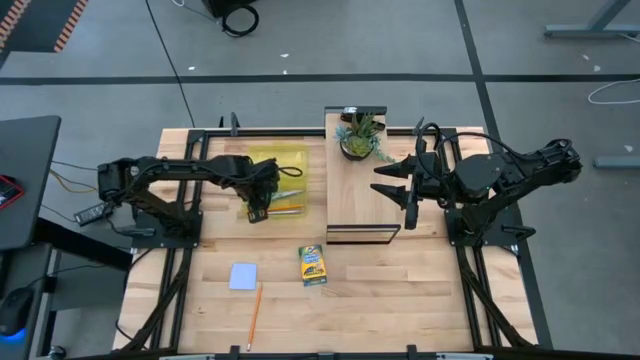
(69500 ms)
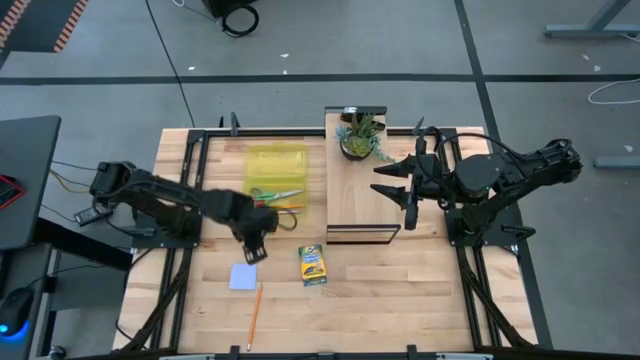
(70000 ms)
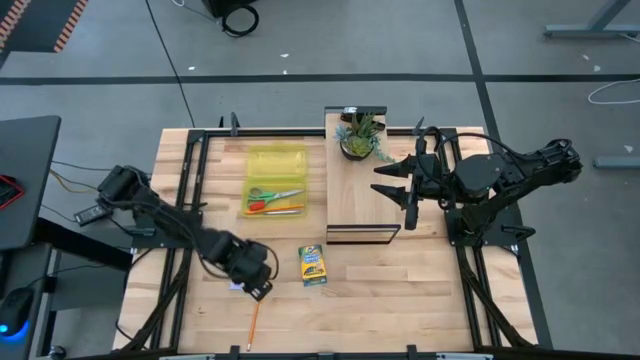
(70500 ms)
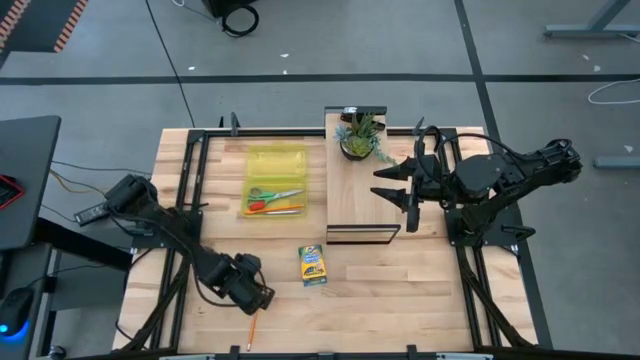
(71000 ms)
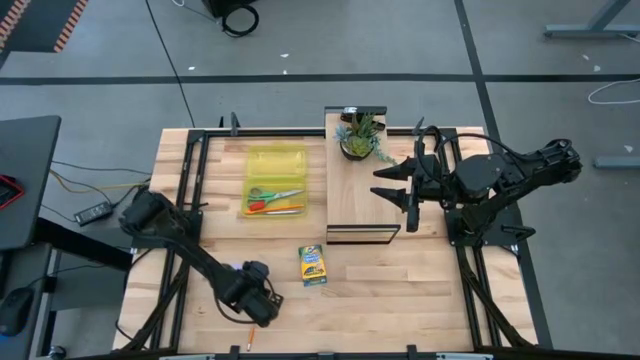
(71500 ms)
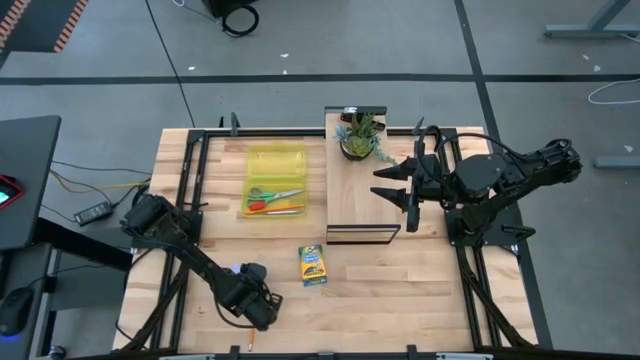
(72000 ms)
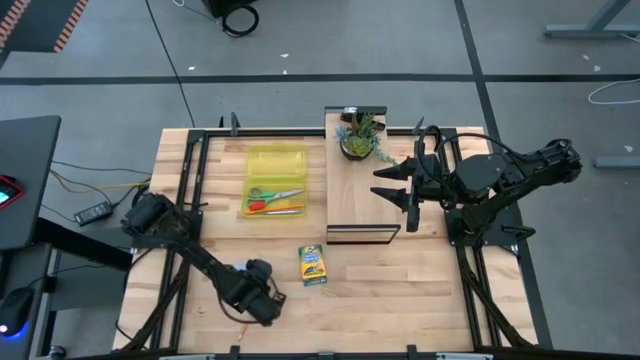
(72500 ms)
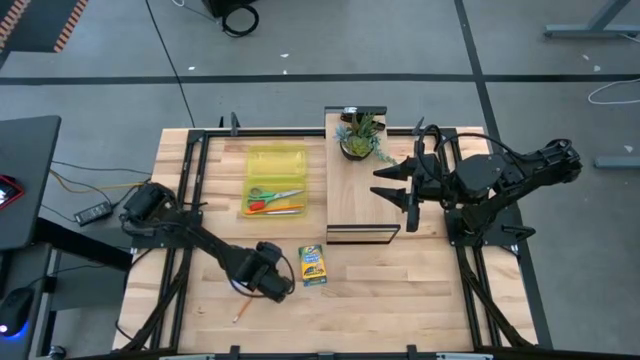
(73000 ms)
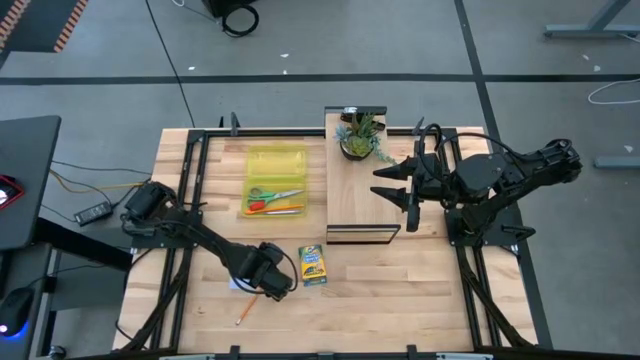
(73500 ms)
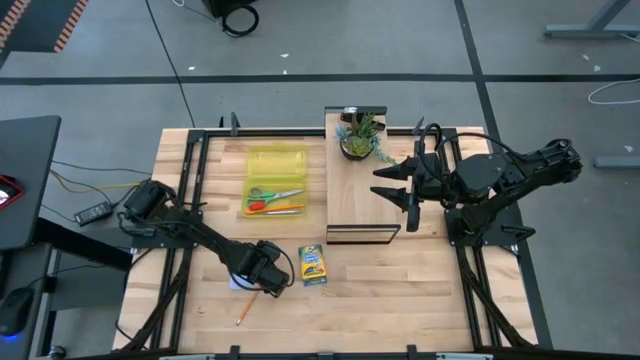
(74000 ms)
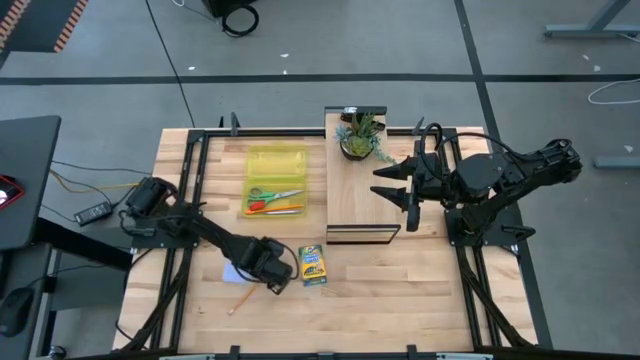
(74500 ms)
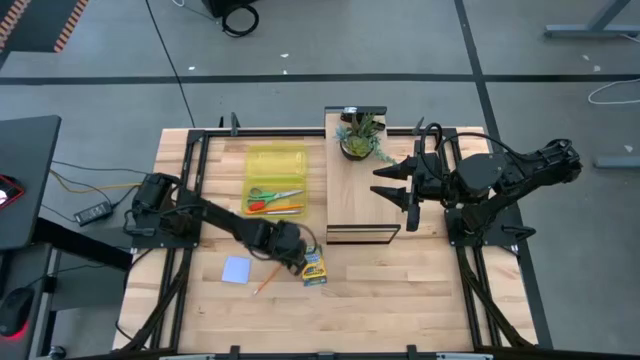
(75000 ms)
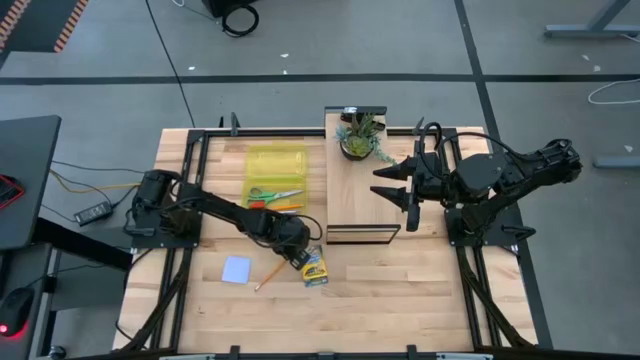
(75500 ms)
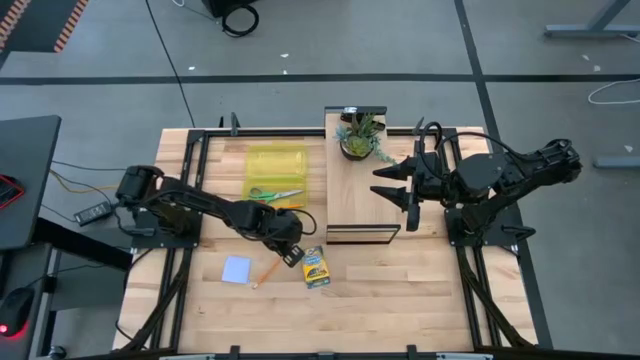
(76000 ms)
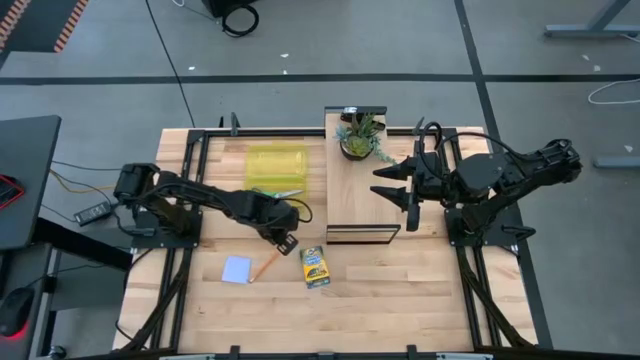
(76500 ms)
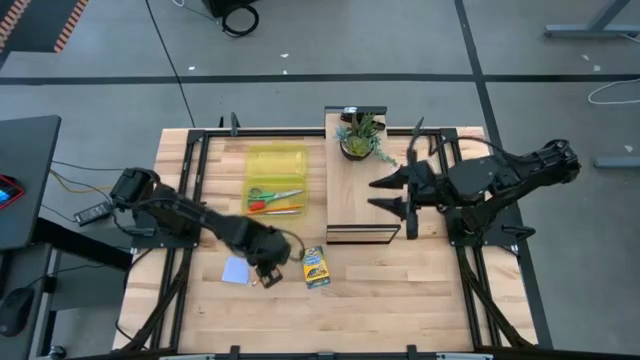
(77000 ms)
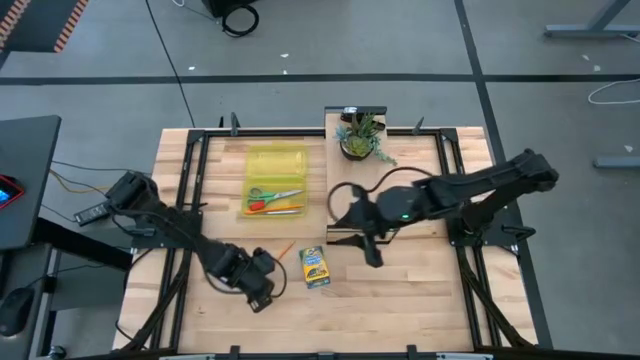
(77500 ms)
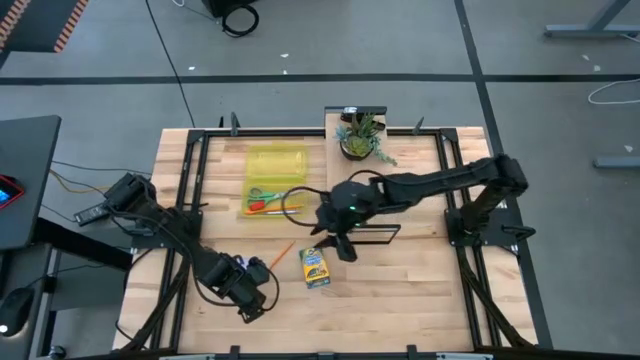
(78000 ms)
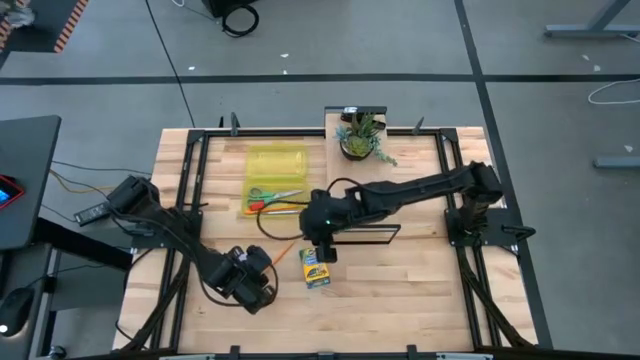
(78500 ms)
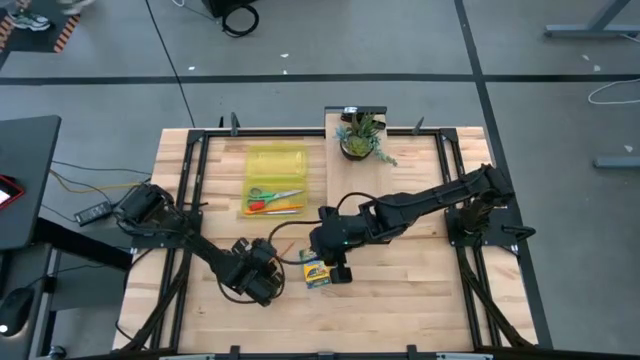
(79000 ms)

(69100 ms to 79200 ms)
Task: Pack school essentials
Put the orange pencil into the yellow supply box

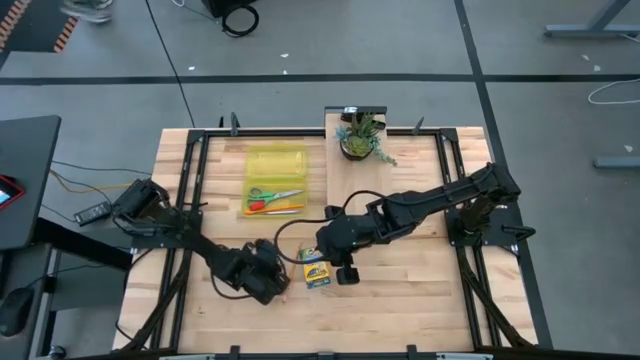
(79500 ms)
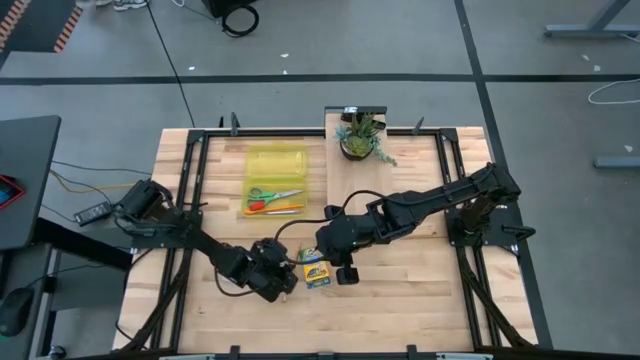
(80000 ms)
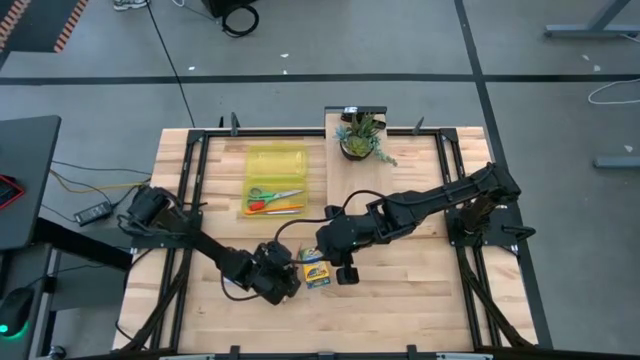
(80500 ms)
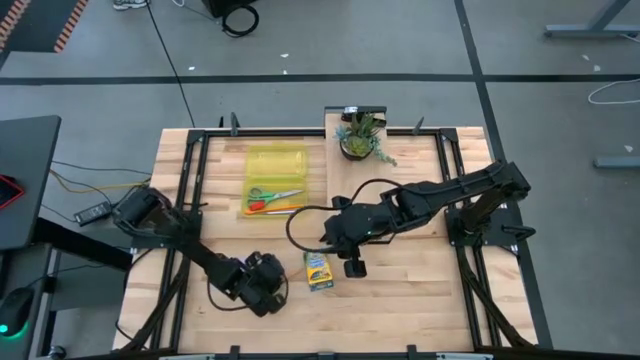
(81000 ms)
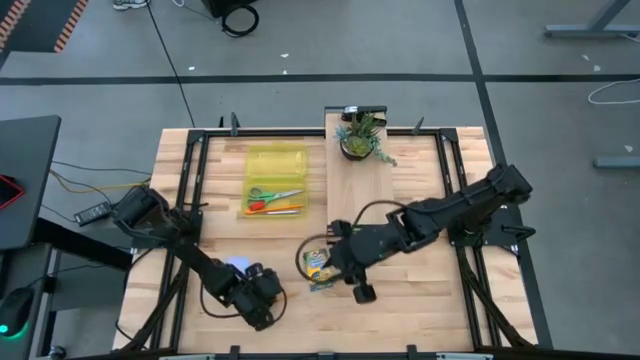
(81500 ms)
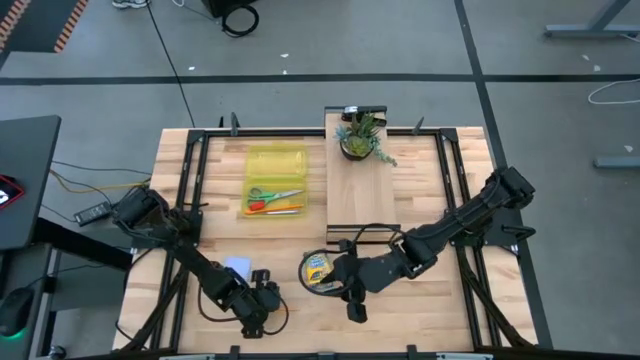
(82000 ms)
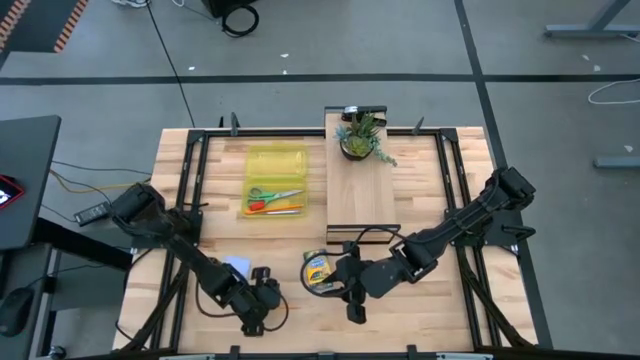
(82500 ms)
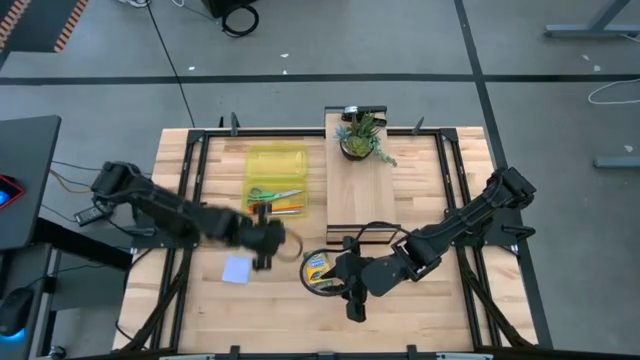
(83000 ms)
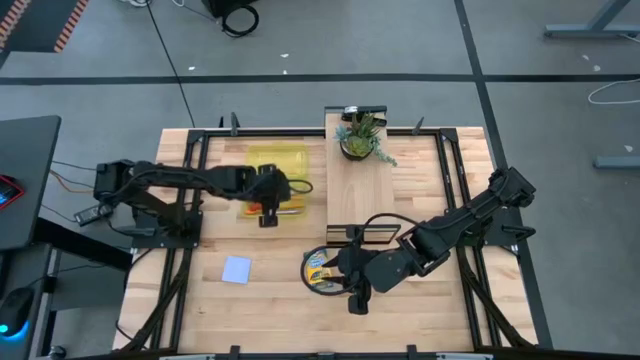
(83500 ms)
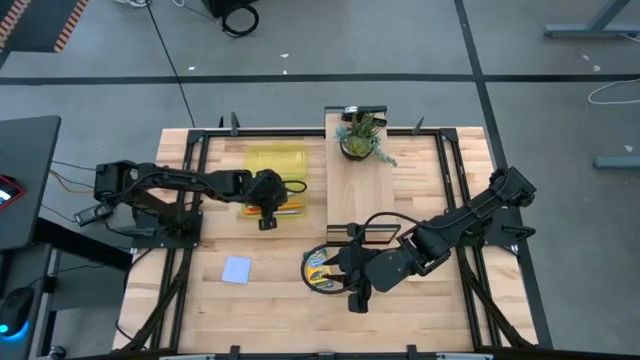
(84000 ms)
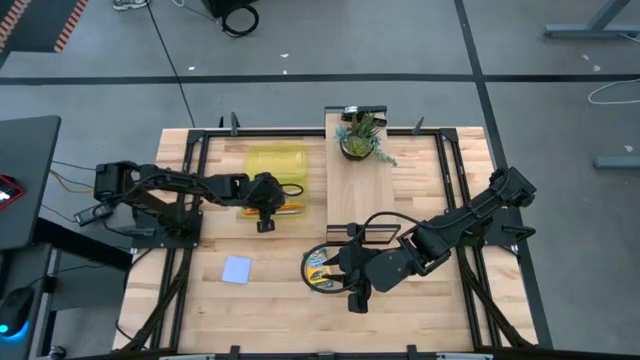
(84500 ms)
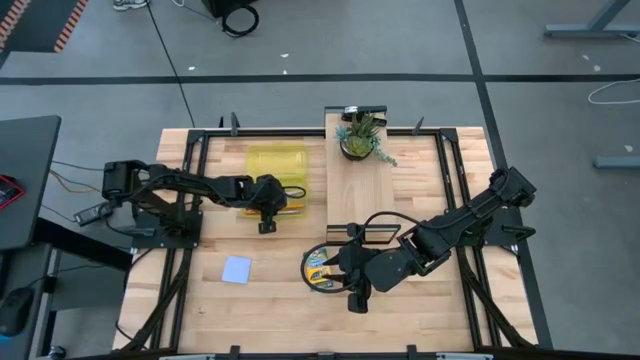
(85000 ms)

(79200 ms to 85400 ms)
Put the orange pencil into the yellow supply box

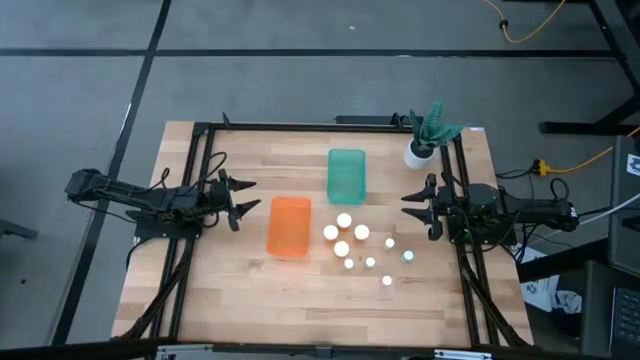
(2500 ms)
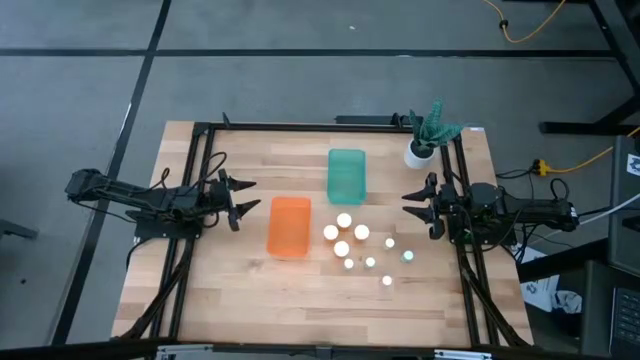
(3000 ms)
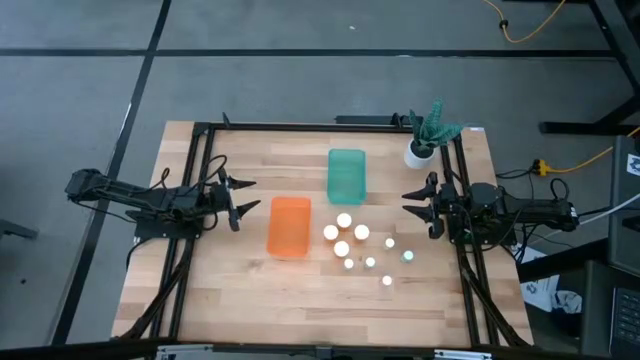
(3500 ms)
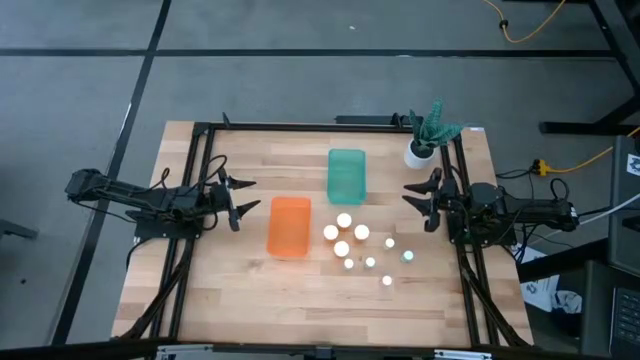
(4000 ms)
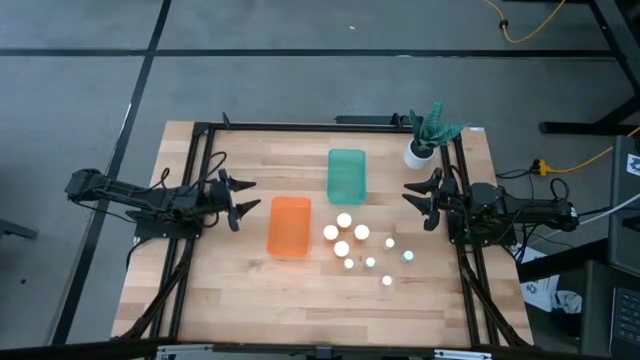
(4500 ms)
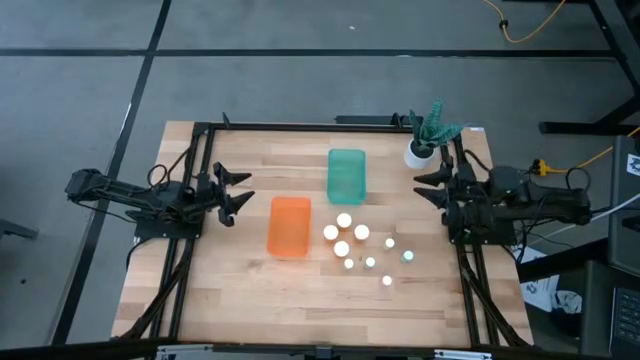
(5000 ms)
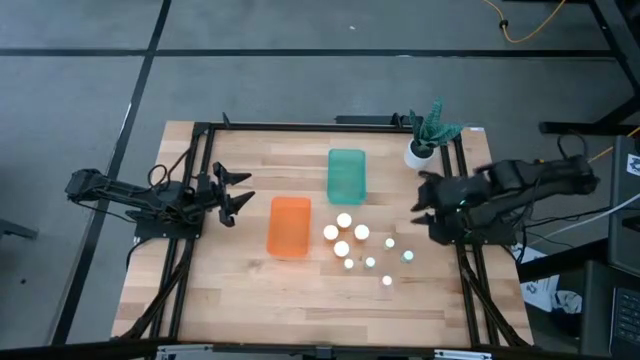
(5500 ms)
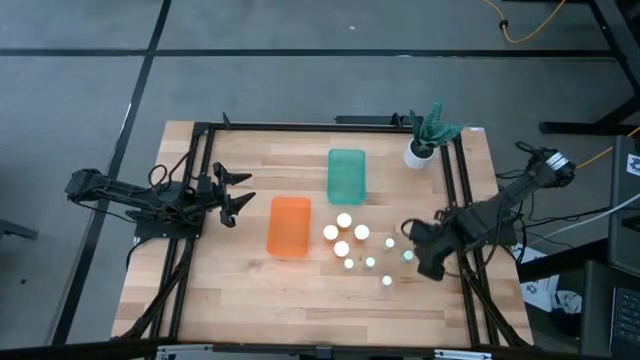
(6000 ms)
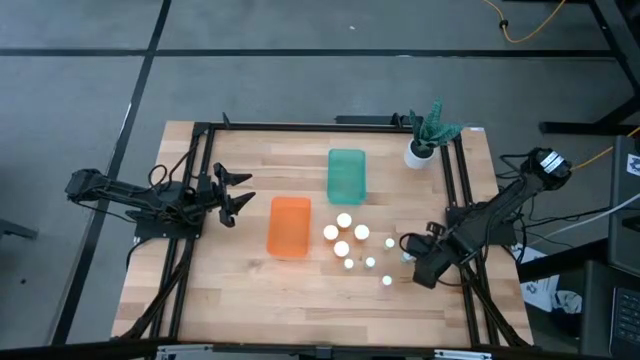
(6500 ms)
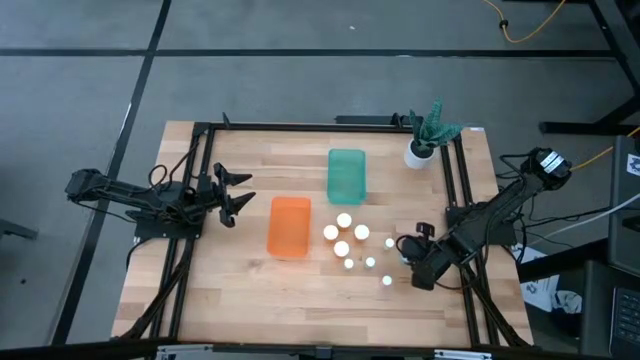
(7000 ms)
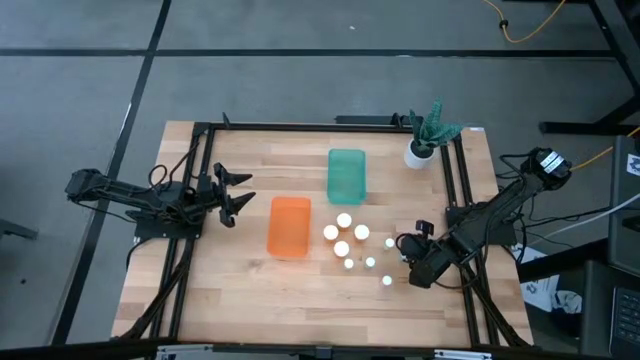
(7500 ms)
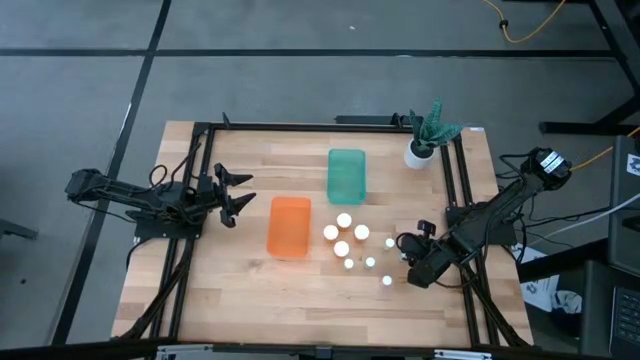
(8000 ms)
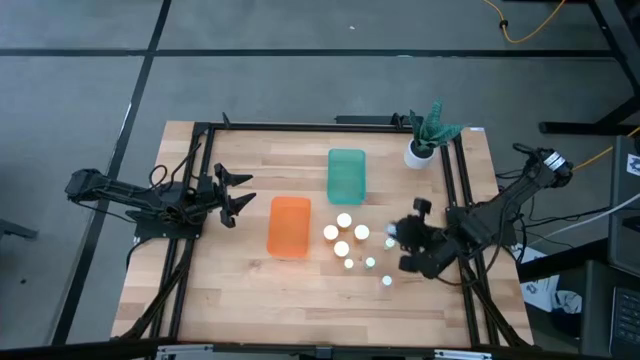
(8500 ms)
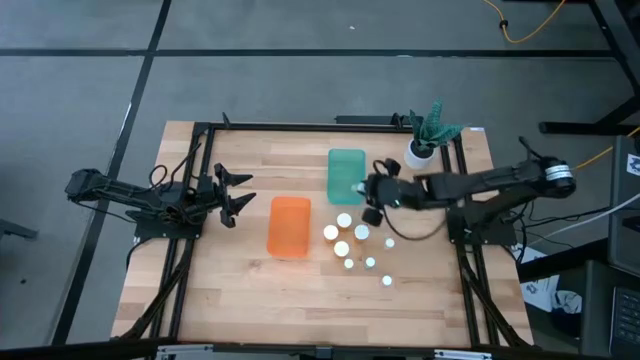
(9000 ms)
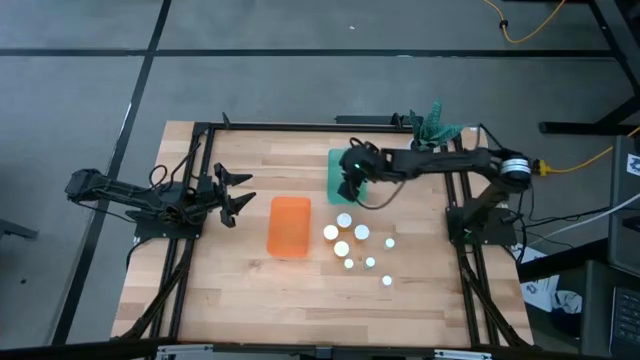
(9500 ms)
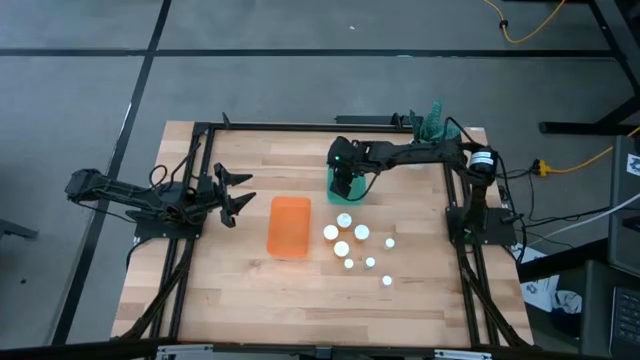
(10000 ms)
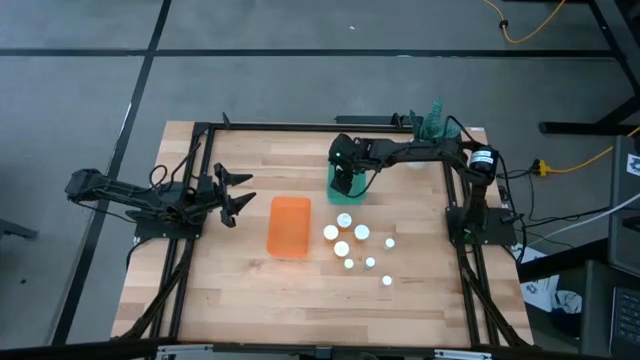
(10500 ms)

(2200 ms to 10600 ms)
Task: Pick and place medicine bottles into bin by pill shape (circle, oval)
Put the small blue medicine bottle into the blue bin
